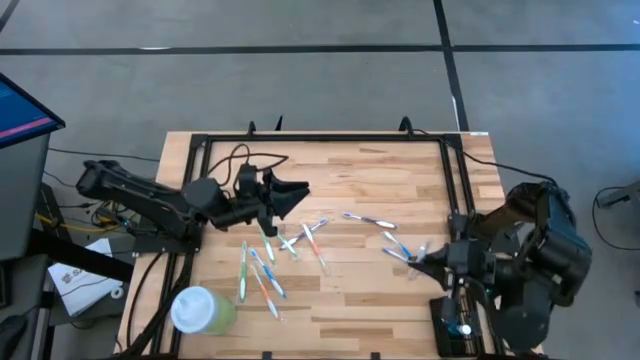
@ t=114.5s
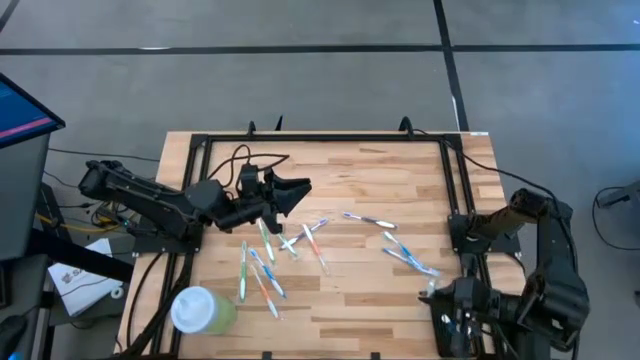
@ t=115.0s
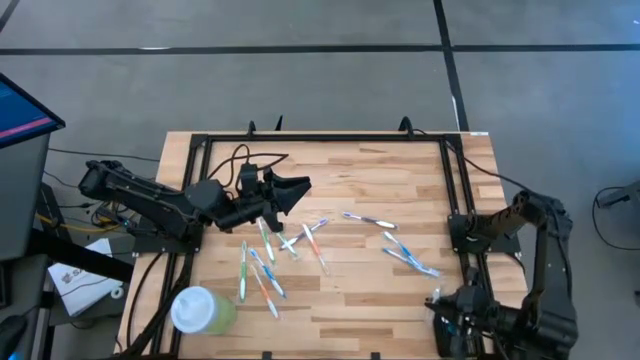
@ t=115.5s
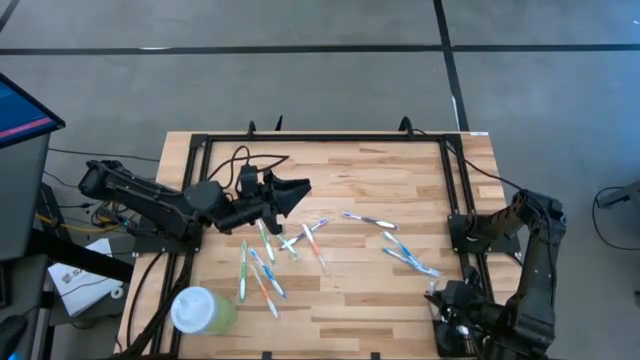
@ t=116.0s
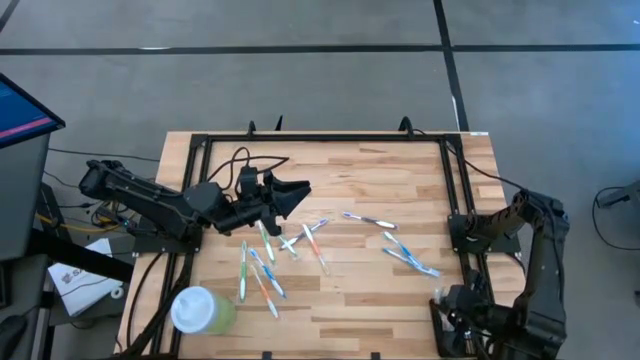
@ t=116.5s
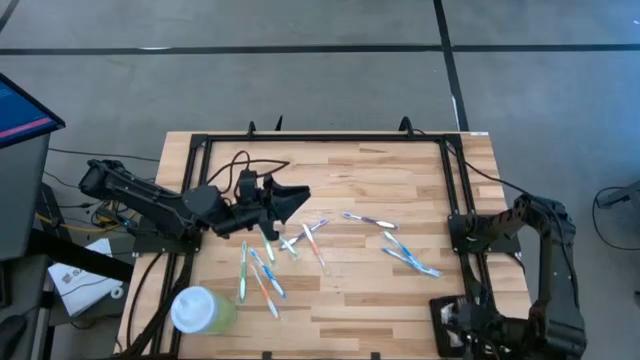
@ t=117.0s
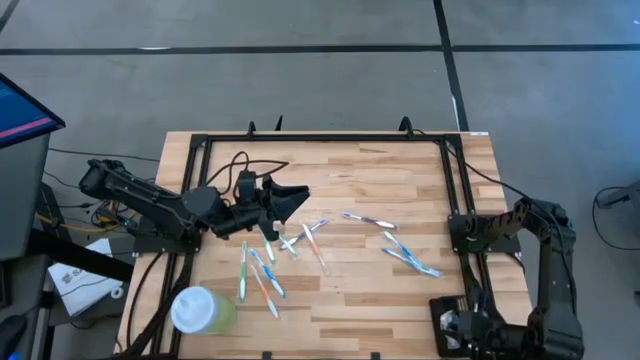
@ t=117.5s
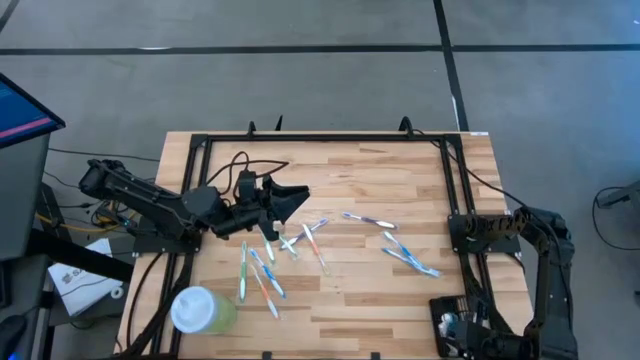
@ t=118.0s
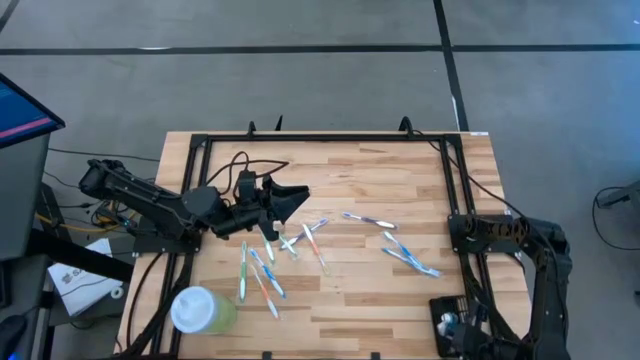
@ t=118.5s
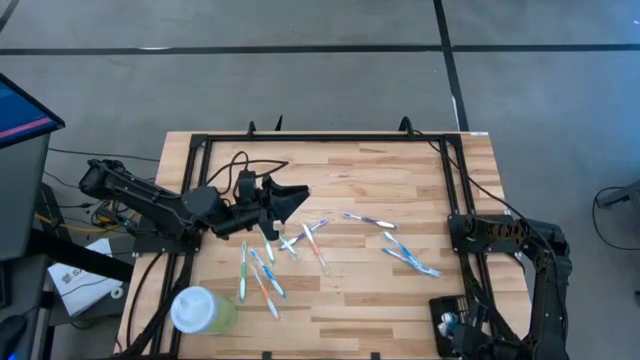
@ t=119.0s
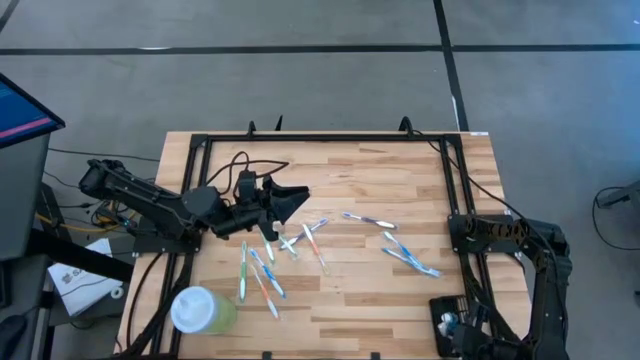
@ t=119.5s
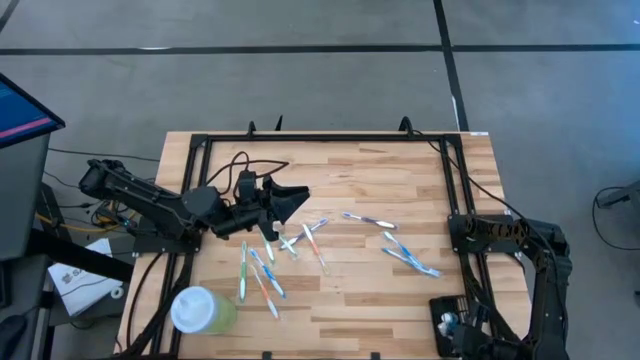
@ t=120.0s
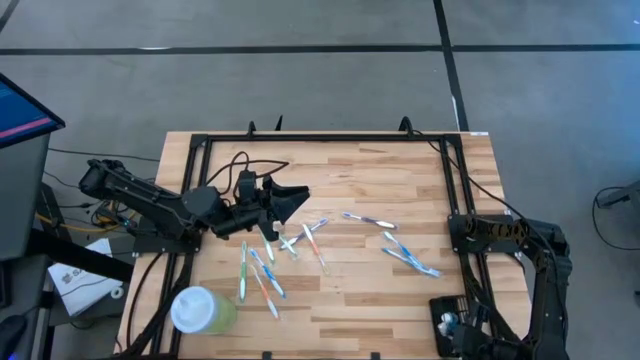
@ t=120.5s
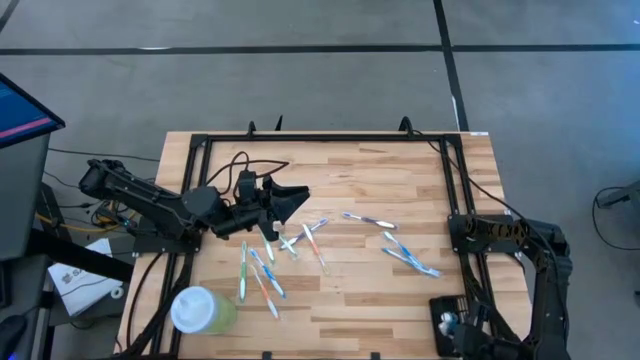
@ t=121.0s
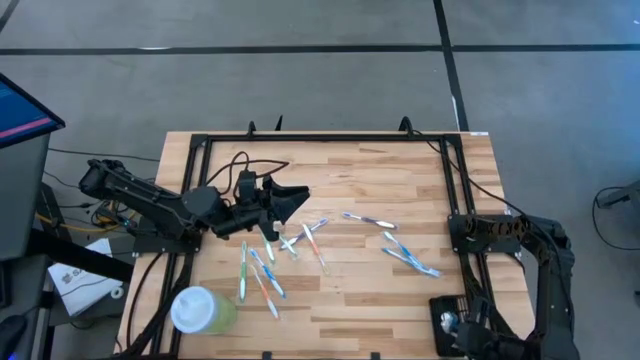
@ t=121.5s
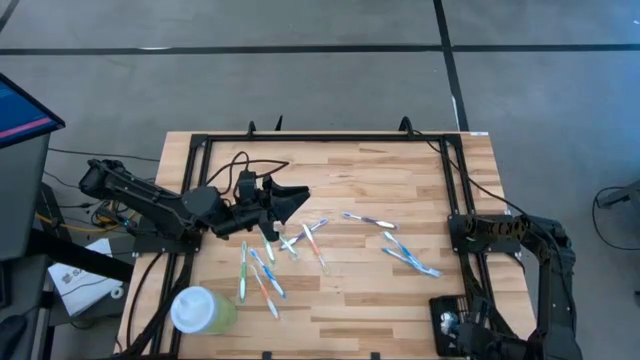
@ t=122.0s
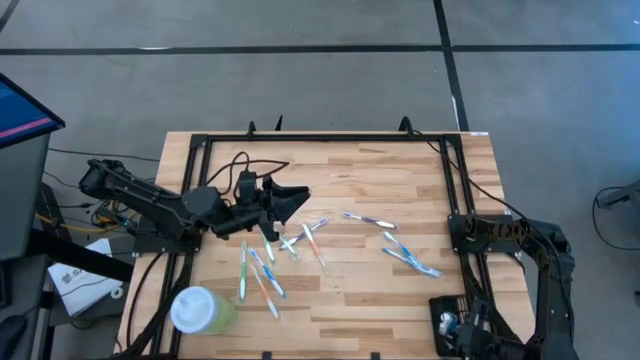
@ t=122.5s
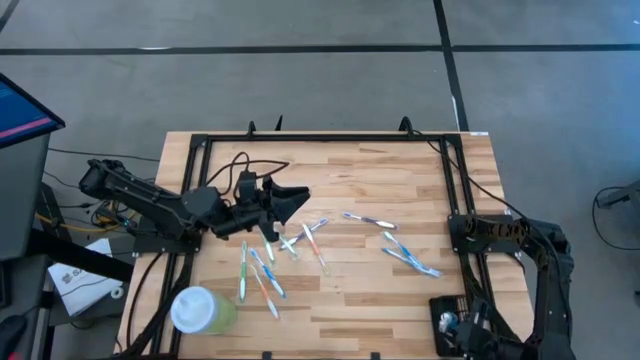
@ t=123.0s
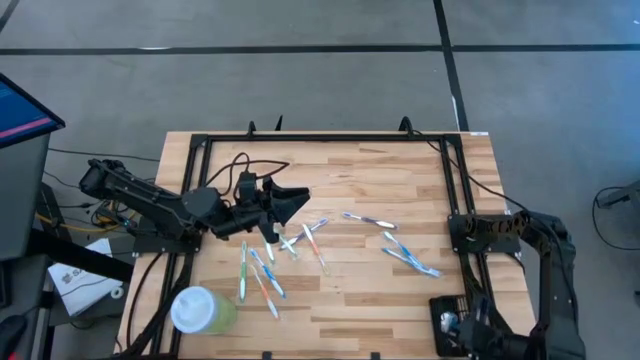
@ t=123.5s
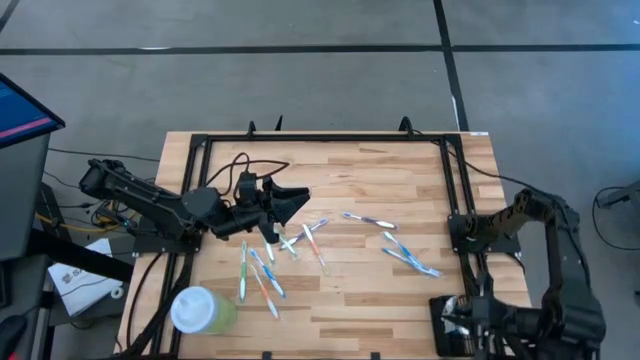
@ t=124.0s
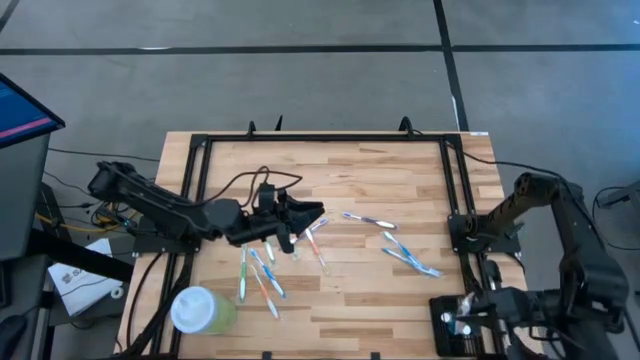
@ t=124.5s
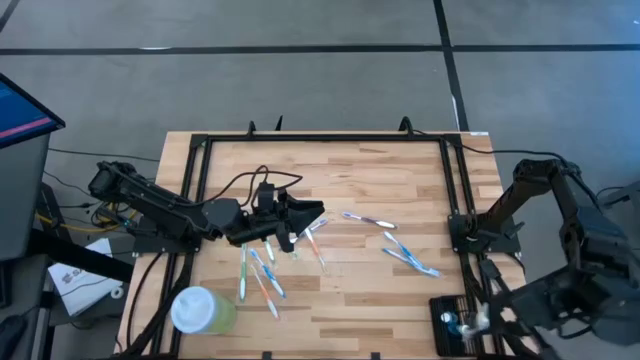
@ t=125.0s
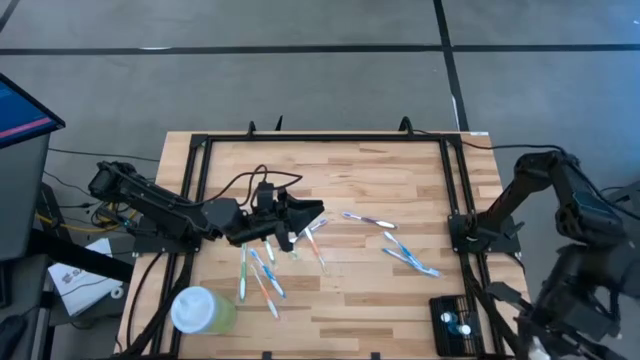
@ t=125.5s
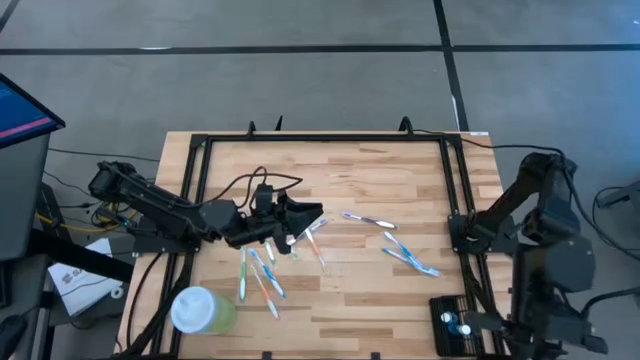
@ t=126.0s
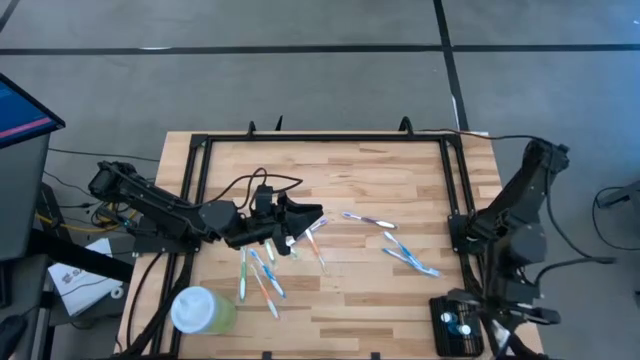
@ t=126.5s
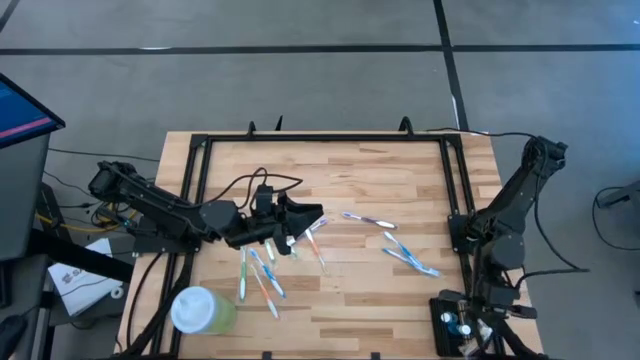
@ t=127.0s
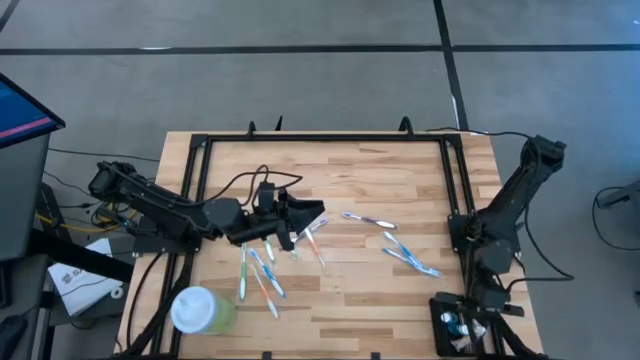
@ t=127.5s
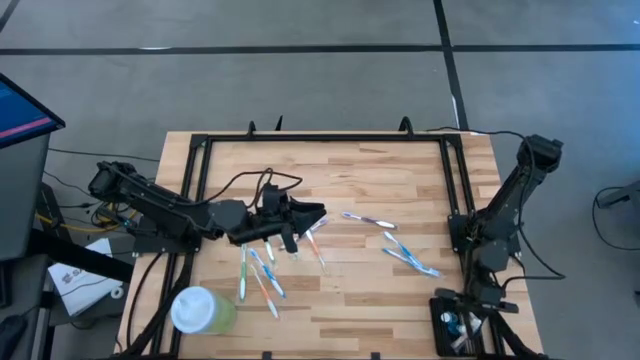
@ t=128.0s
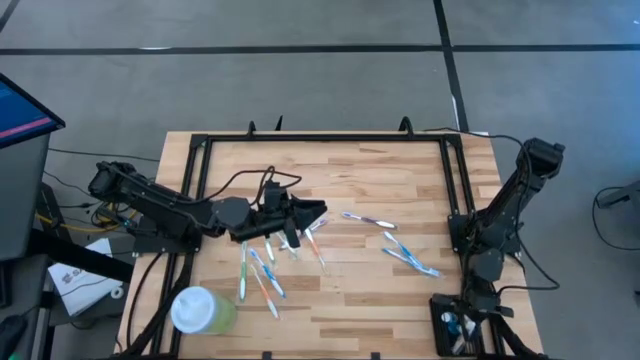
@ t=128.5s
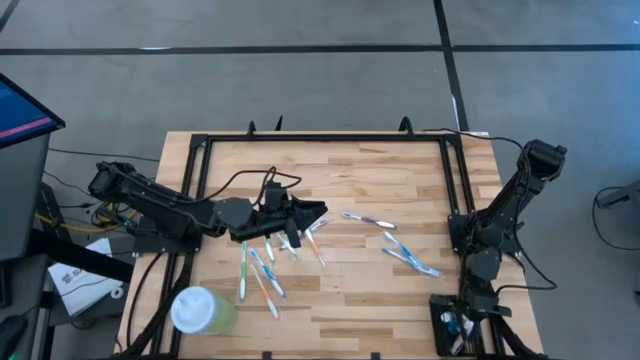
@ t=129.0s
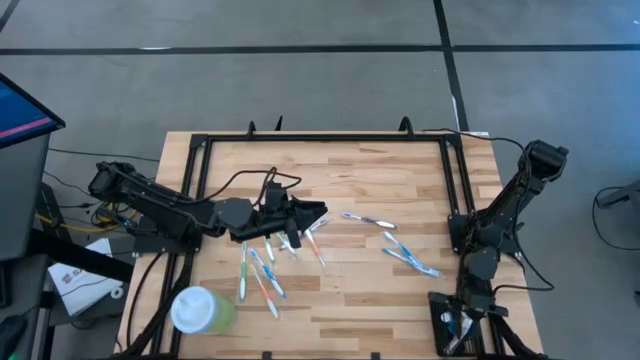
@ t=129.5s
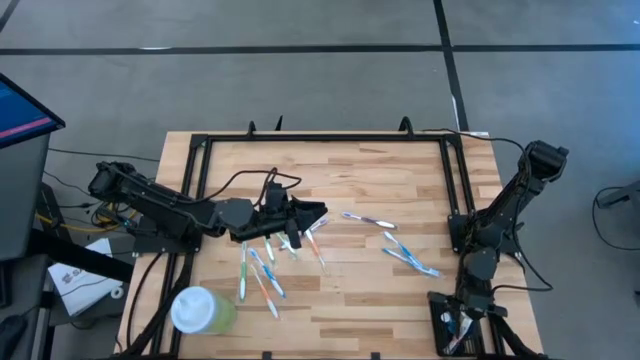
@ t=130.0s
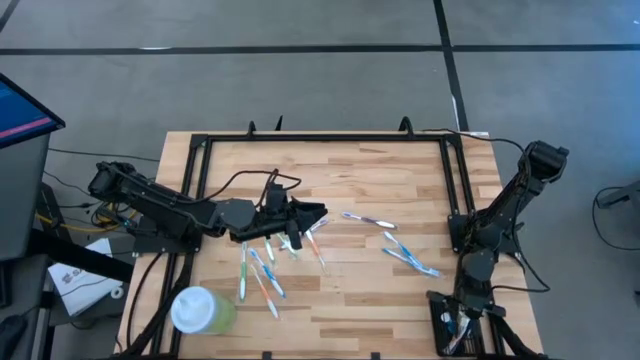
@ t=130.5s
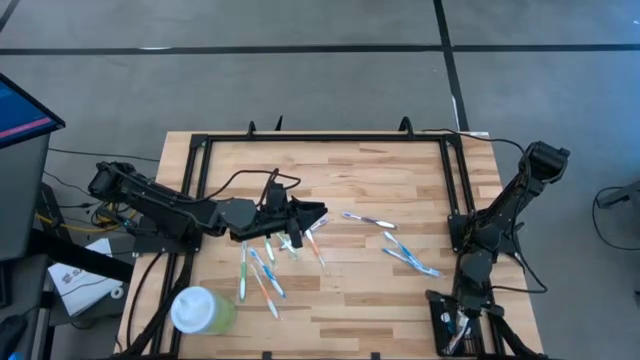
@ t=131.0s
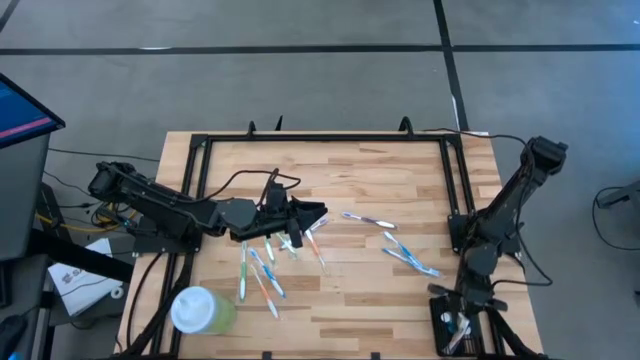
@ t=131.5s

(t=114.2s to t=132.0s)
Task: Pick & Place toothbrushing station
Put the top orange toothbrush into the black organizer

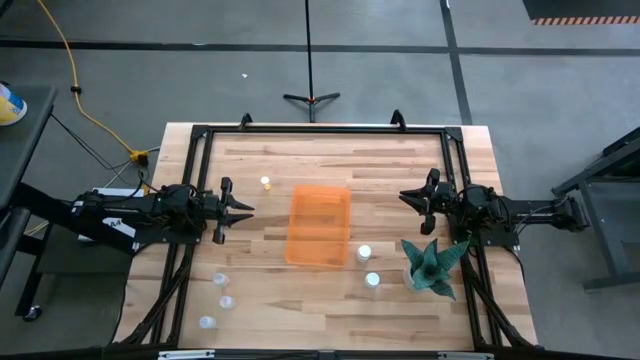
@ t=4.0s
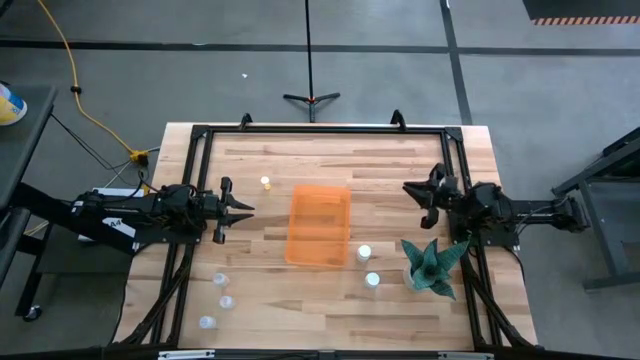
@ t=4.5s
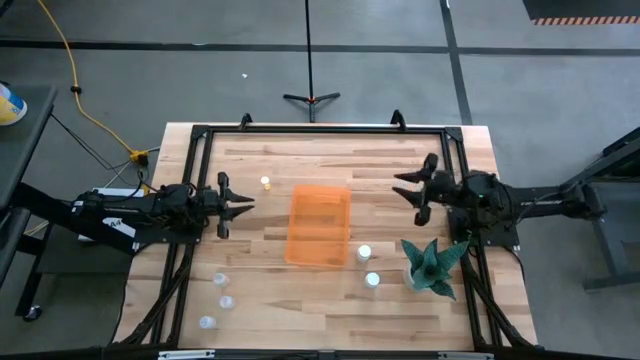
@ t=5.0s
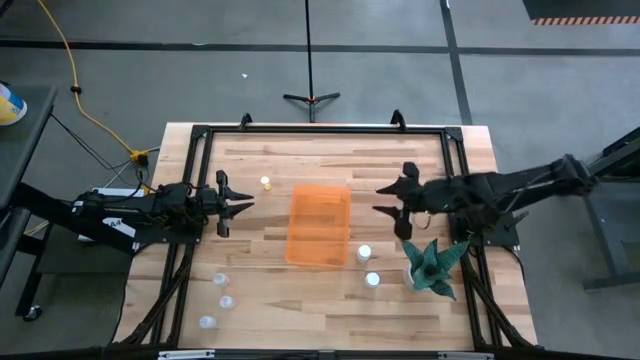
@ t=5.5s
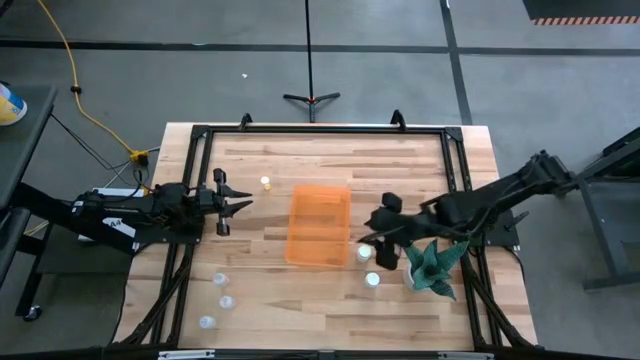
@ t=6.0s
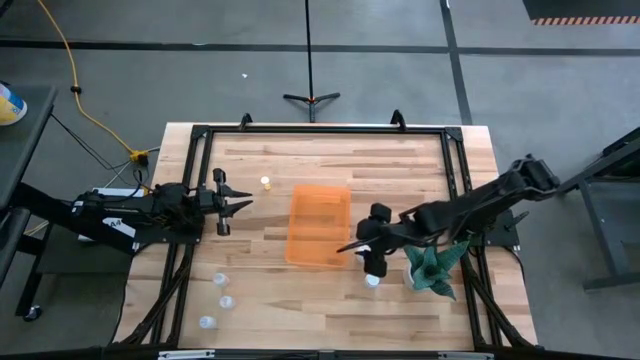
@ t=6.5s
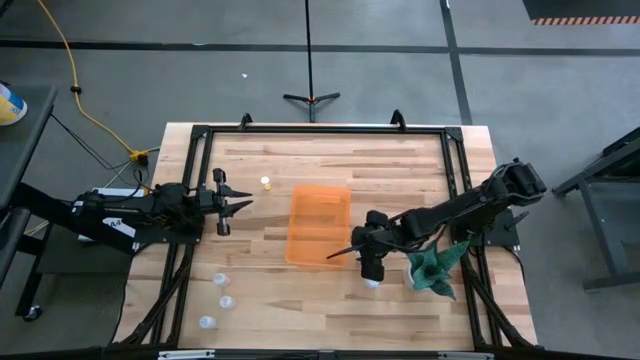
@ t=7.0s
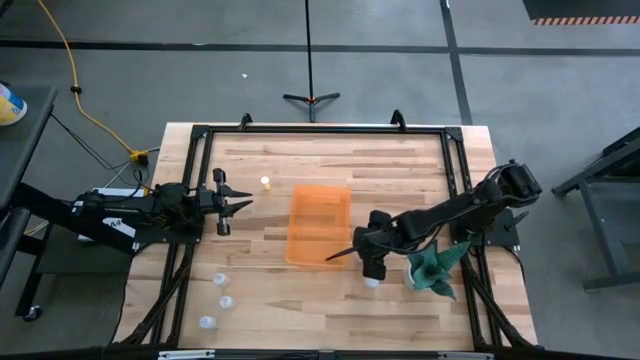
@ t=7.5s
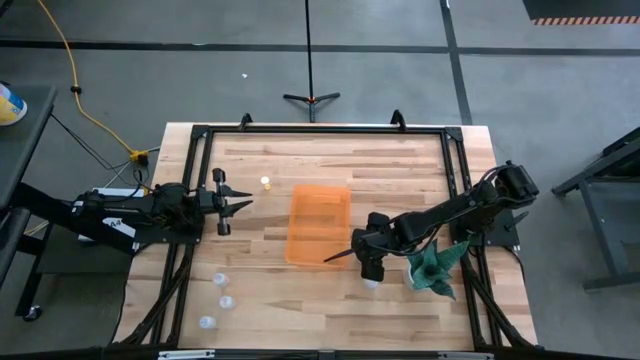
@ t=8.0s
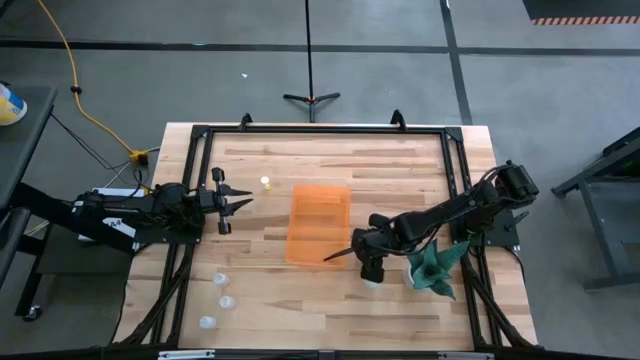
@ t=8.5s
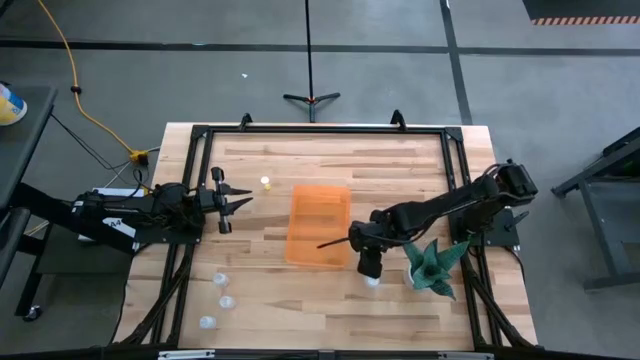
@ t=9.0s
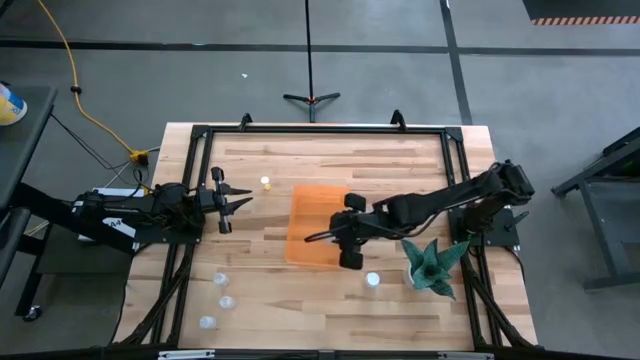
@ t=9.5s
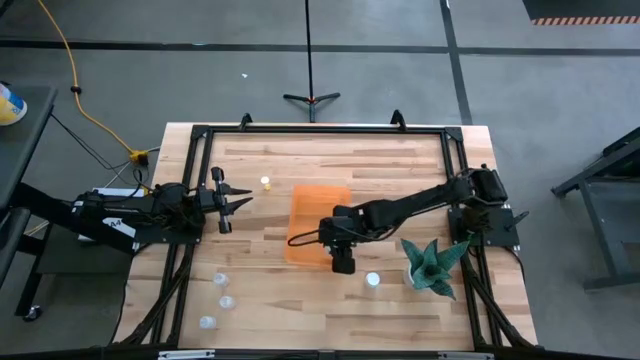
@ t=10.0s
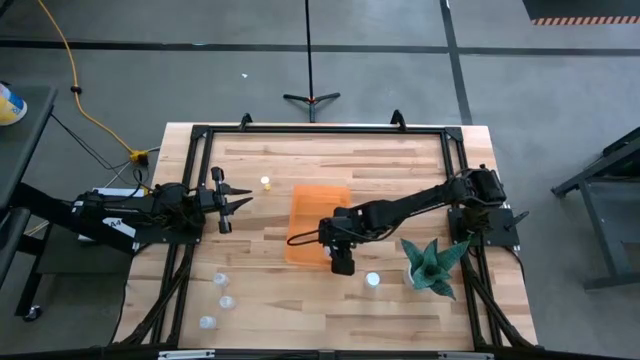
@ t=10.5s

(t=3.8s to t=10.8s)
Task: Pick and place pill bottles into a basket
Put the top white pill bottle into the orange bin
